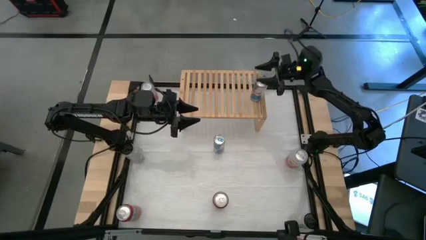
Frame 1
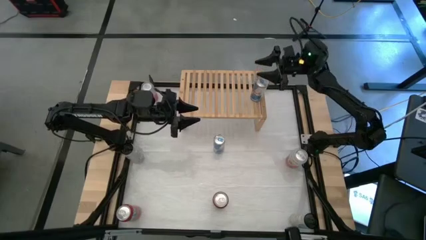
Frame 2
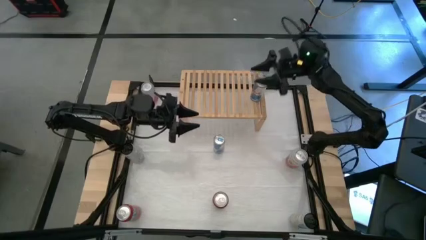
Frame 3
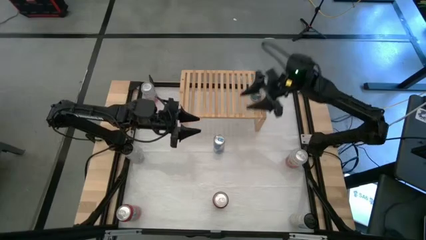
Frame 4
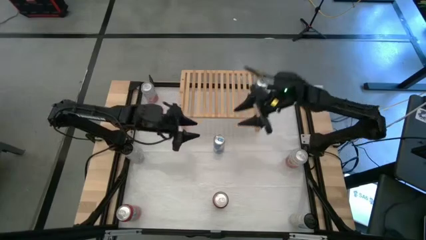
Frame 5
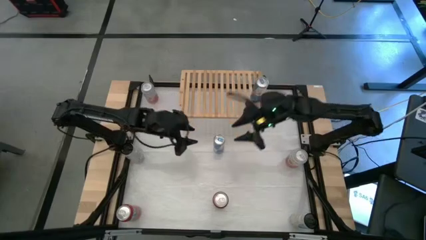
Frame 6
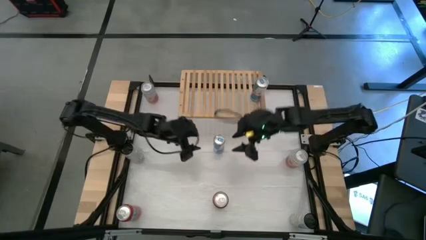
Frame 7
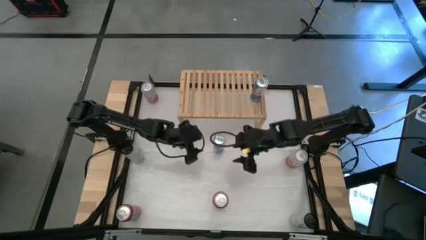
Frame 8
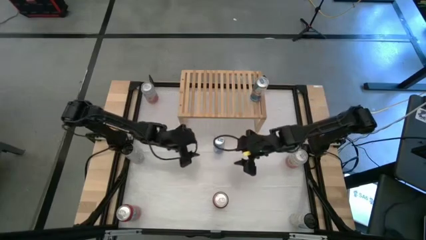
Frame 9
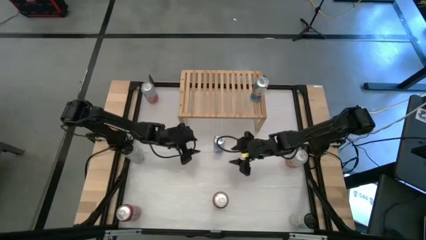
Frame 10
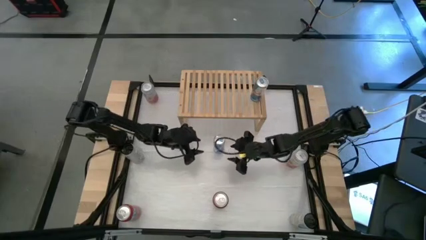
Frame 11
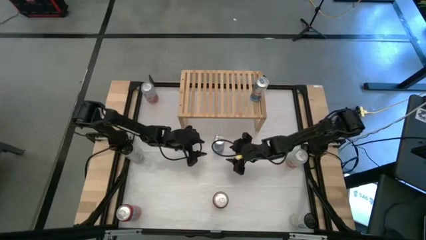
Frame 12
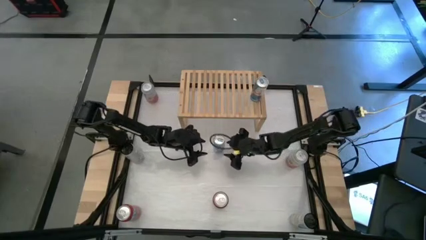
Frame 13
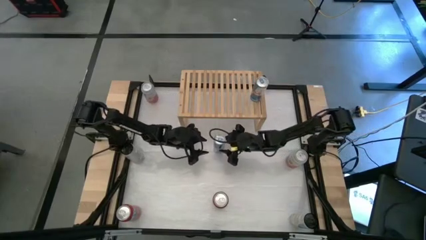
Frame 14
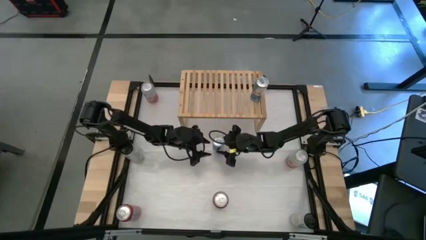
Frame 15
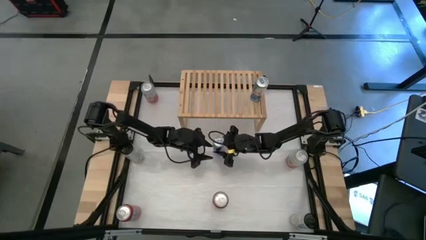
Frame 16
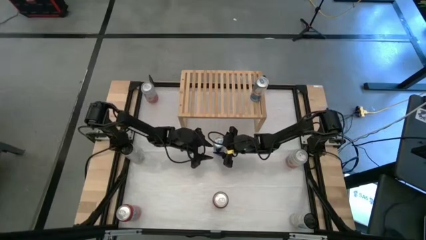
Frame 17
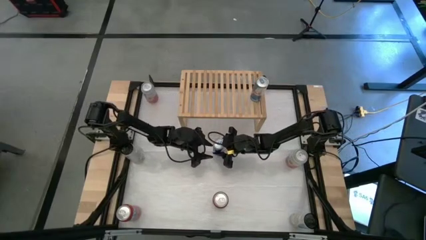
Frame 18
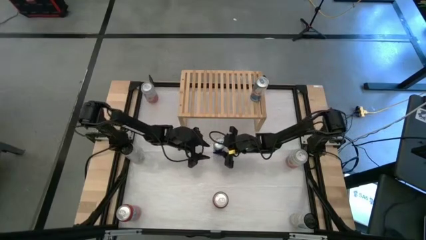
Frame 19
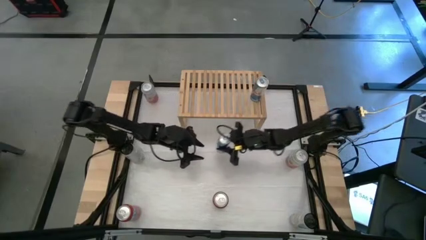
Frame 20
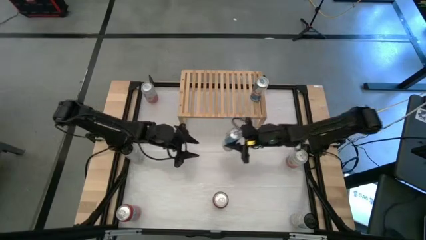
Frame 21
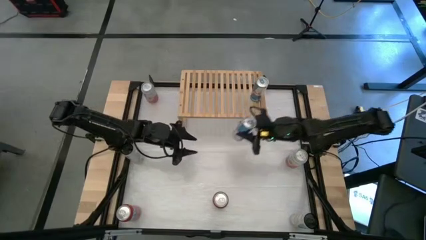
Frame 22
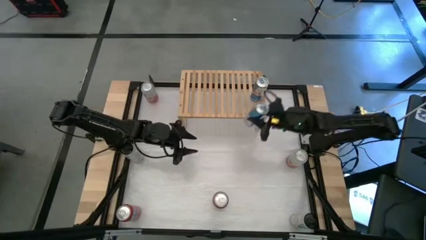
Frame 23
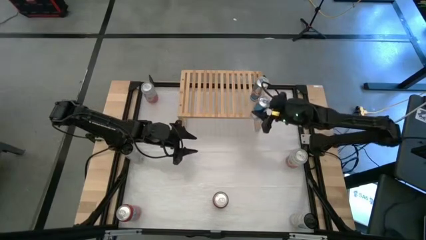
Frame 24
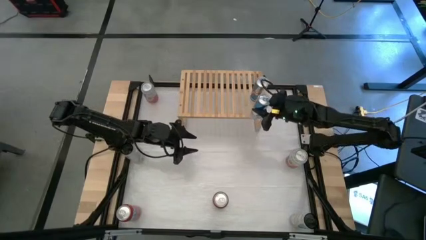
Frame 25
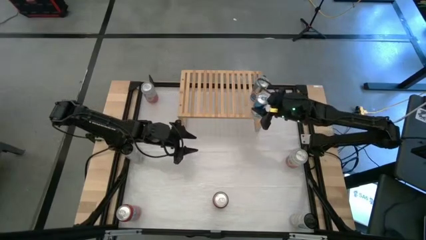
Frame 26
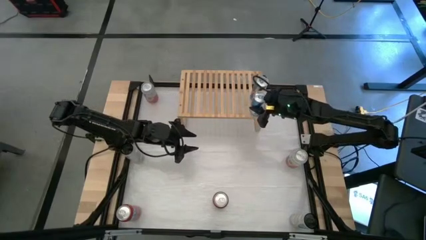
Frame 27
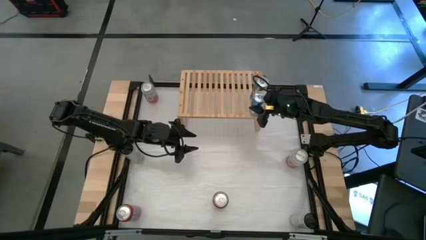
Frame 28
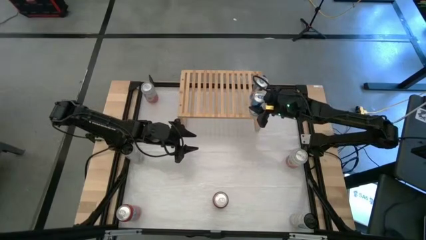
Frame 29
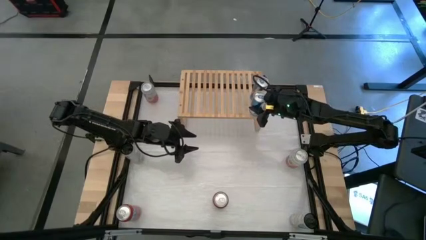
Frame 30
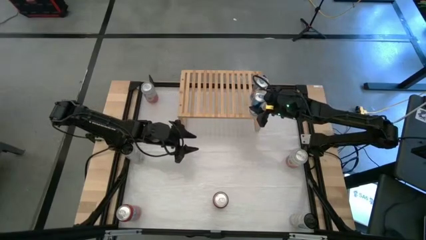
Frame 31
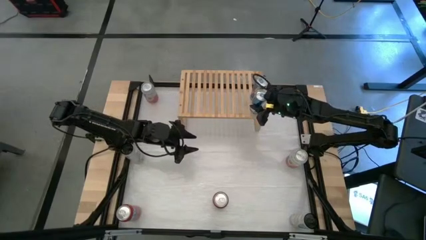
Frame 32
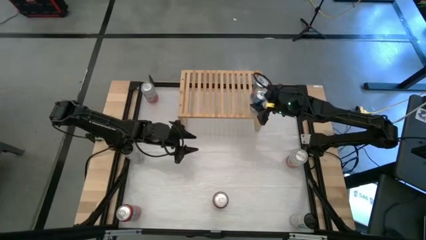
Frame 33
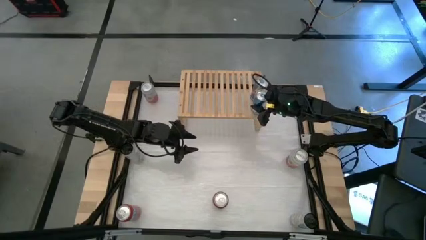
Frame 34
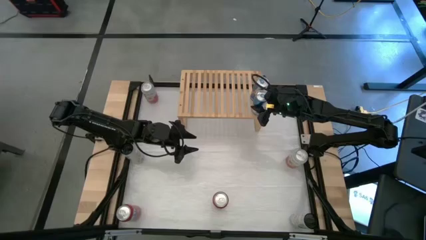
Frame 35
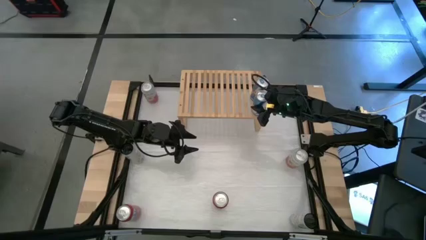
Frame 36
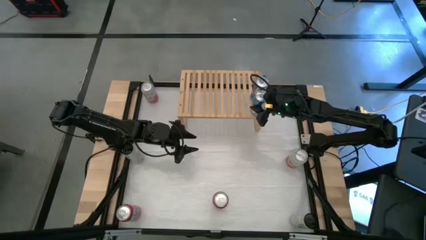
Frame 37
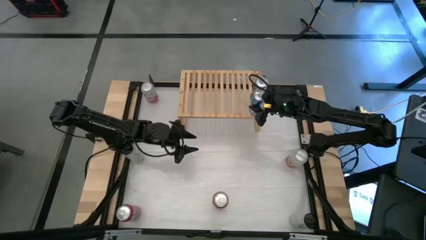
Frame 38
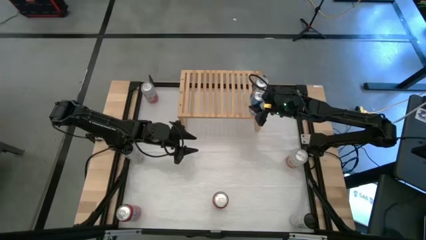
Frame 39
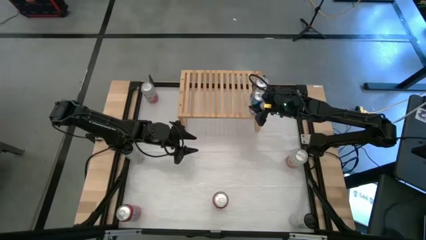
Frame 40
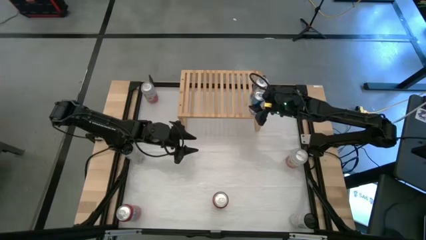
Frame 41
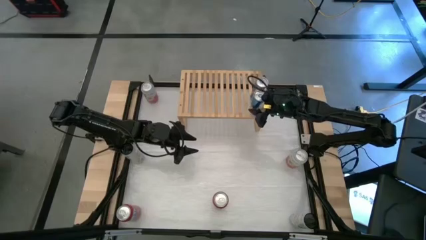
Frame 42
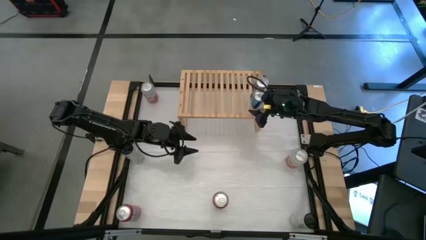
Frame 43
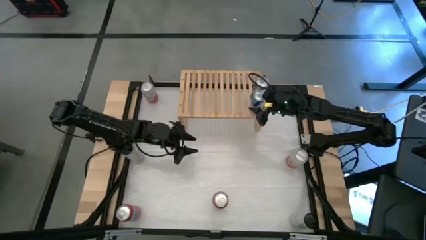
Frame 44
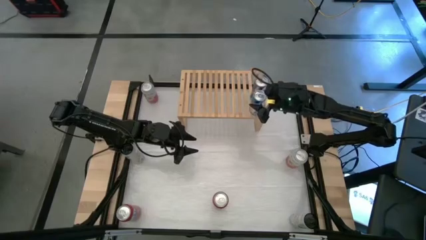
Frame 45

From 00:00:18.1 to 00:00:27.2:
Task: Place canned beverage on shelf
Put the blue soda can on the shelf aligned with the other blue soda can

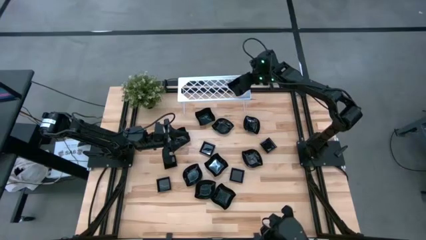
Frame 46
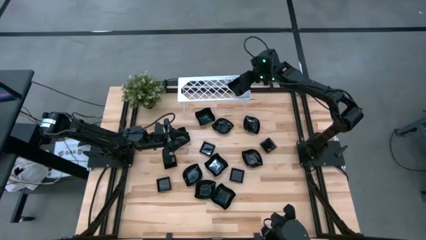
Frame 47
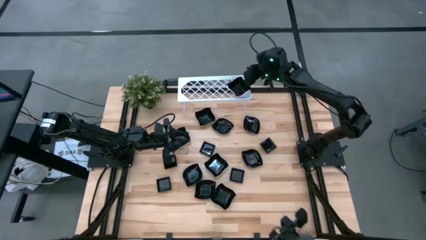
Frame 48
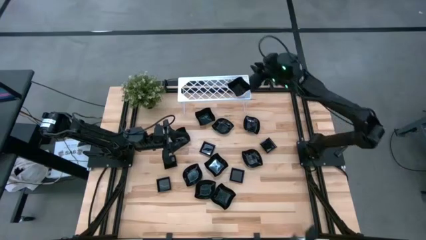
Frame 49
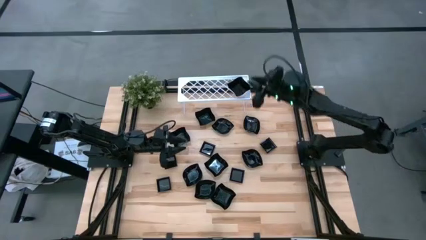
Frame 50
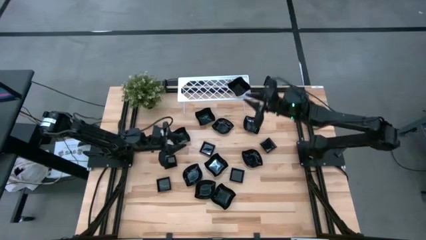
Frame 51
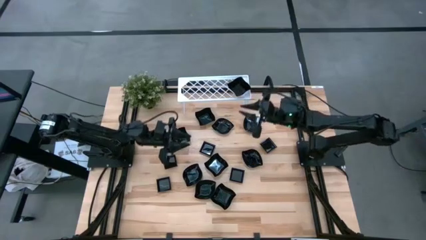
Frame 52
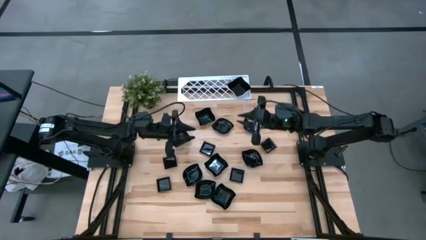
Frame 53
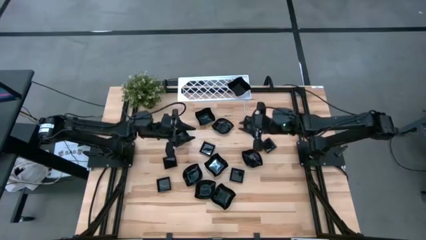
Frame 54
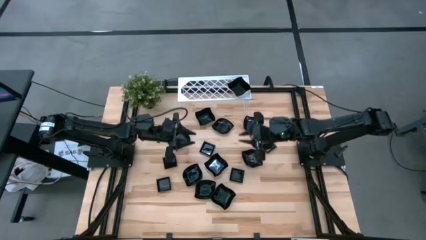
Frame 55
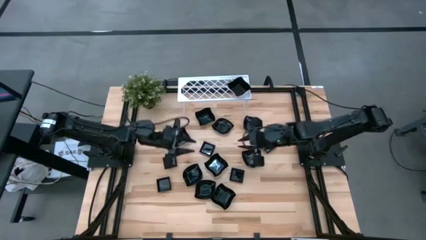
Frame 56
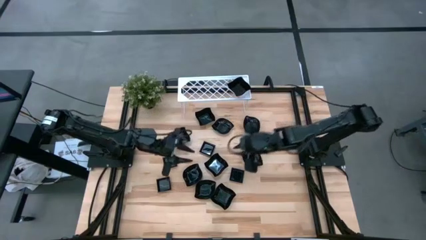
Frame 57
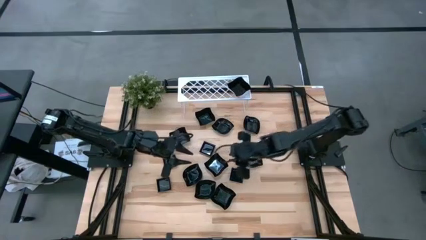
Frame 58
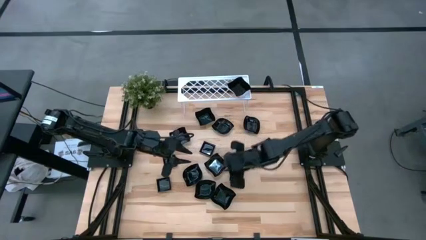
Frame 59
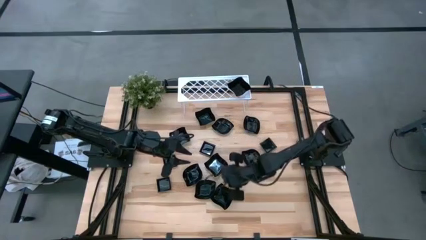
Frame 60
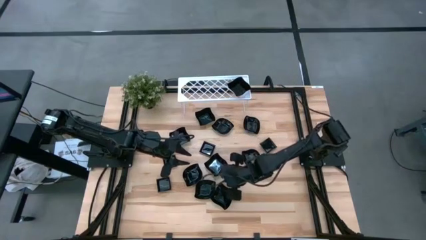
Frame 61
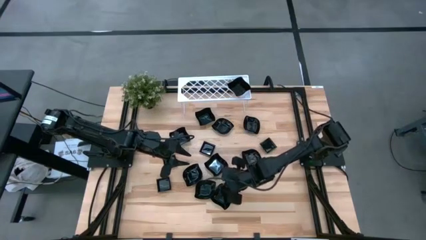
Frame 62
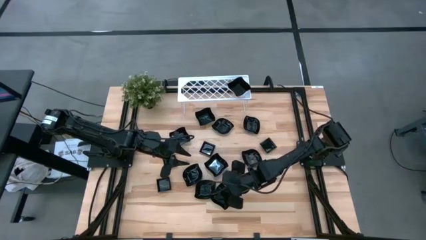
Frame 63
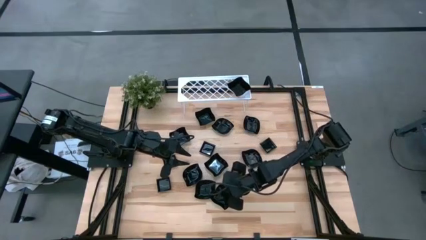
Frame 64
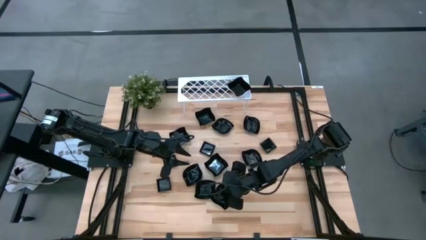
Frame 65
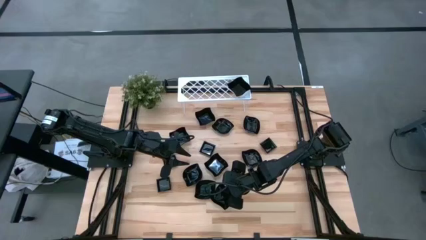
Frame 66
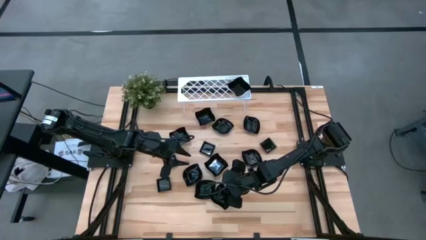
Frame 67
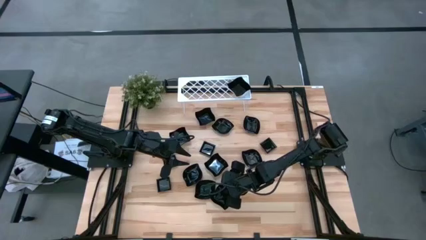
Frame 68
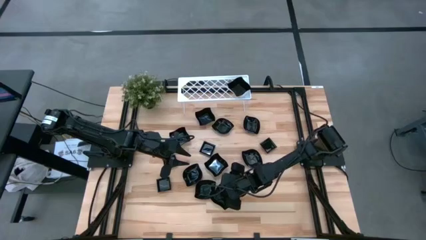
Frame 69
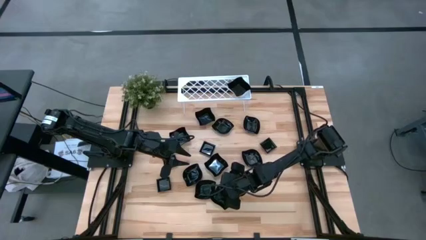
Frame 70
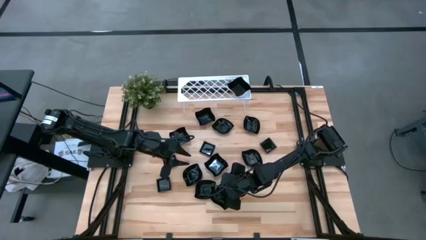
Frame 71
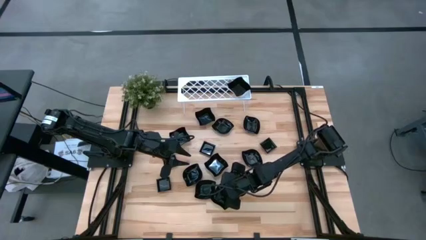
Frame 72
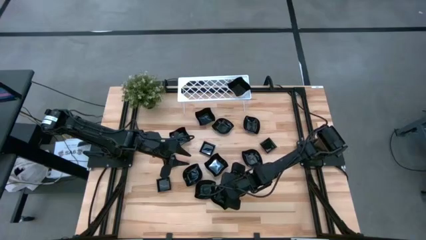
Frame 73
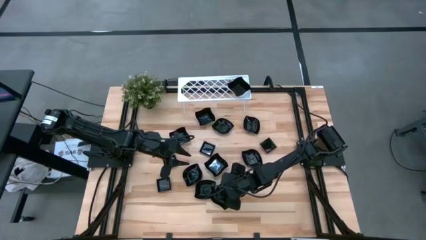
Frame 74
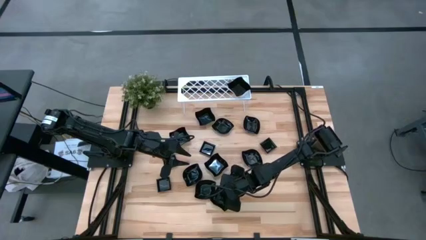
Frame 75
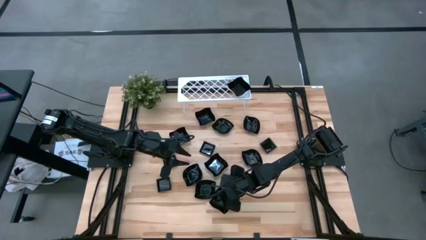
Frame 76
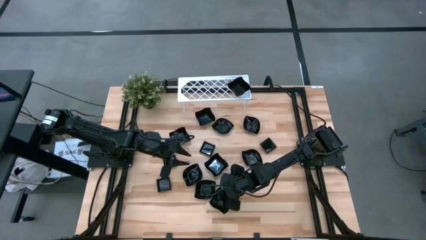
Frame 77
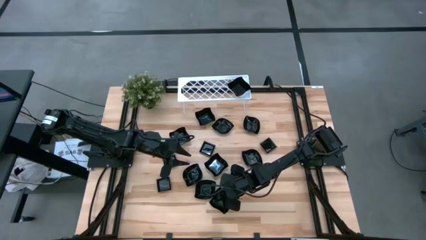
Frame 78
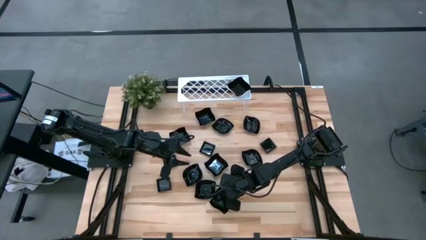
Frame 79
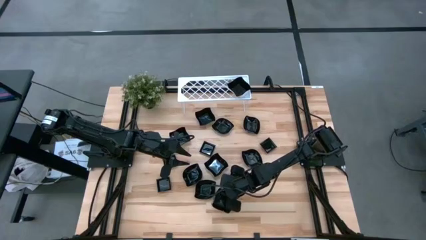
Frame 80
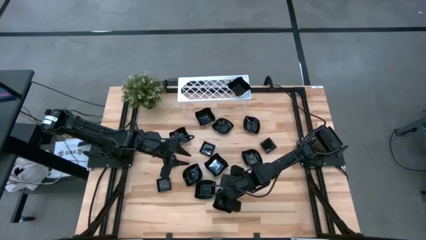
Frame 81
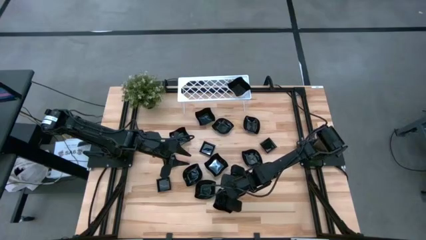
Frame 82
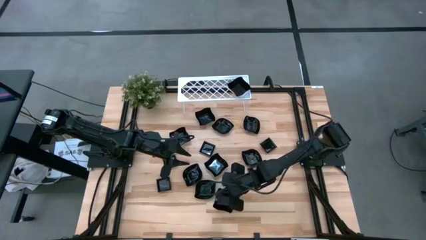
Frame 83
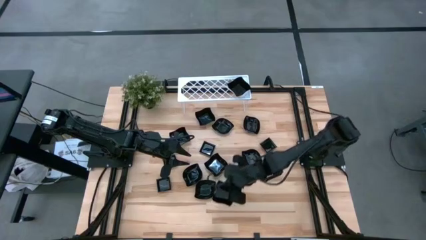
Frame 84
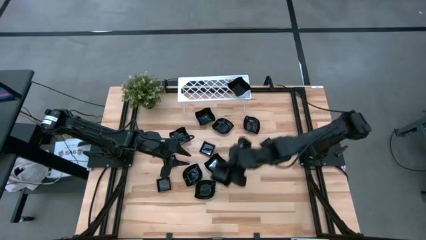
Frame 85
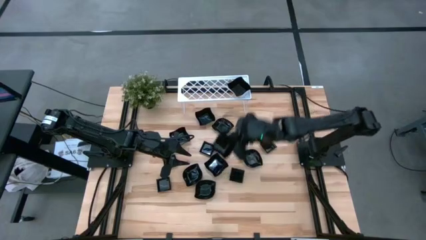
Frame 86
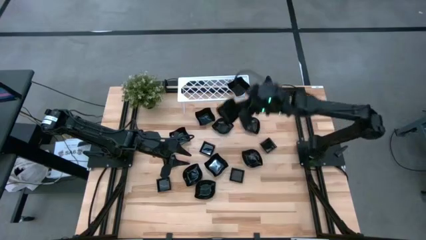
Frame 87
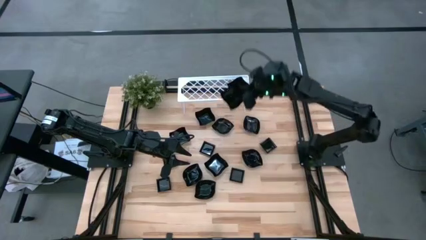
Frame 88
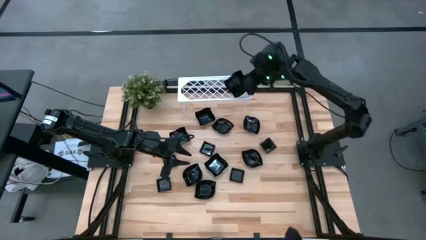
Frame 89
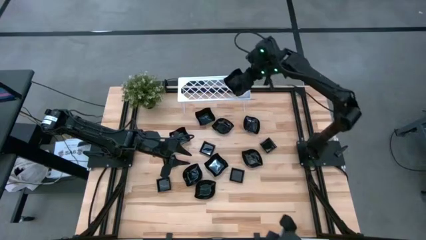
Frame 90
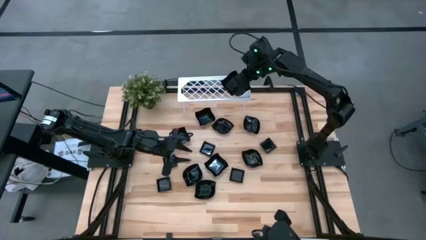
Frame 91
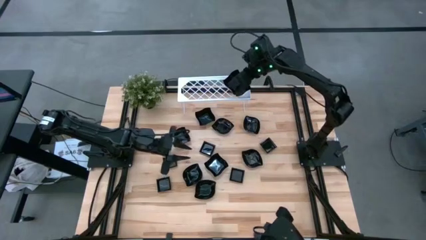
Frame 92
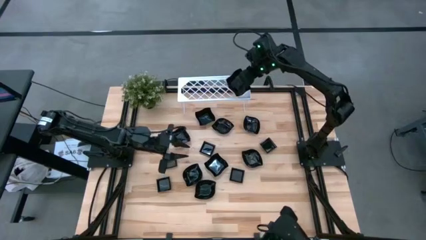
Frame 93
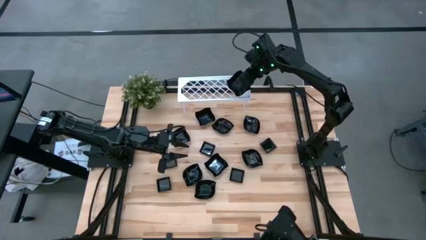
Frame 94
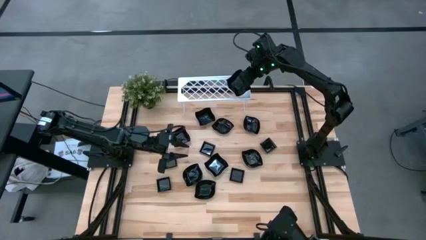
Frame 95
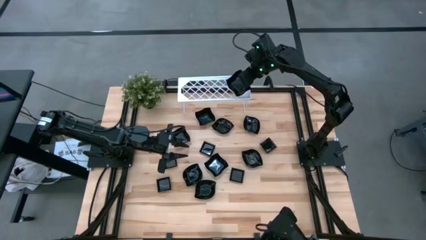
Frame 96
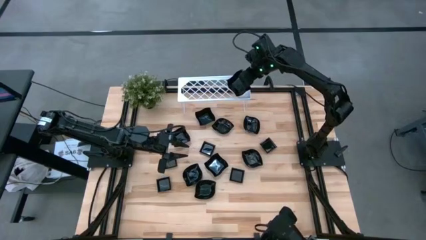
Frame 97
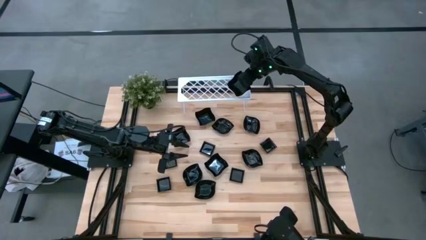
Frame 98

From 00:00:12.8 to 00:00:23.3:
Task: Pick & Place Mini shaped plates
Stack the black distorted square plate on top of the black distorted square plate on the shelf
